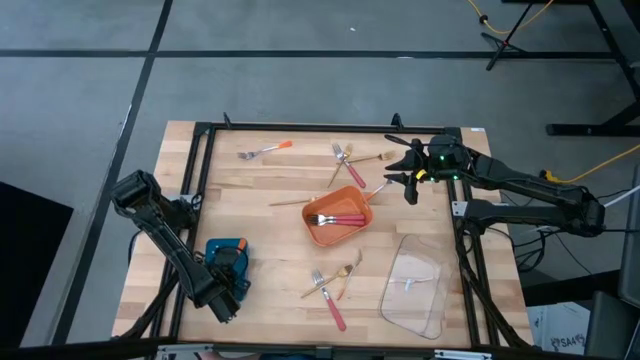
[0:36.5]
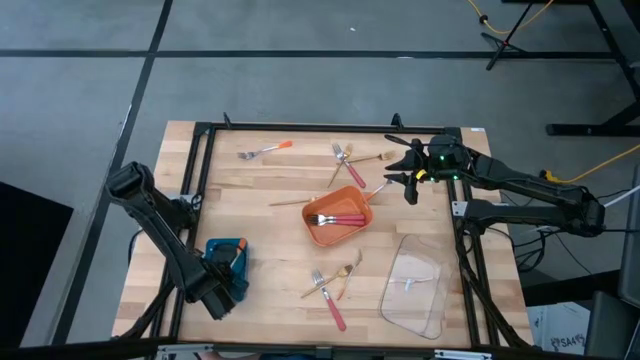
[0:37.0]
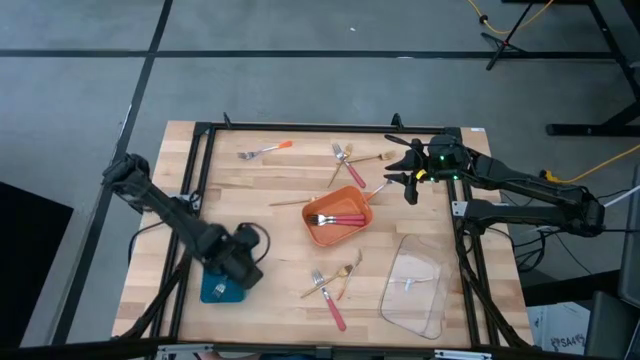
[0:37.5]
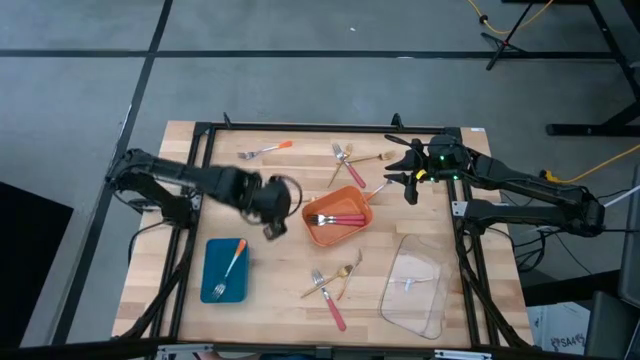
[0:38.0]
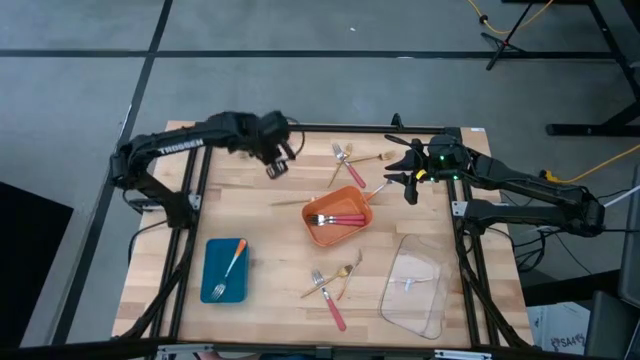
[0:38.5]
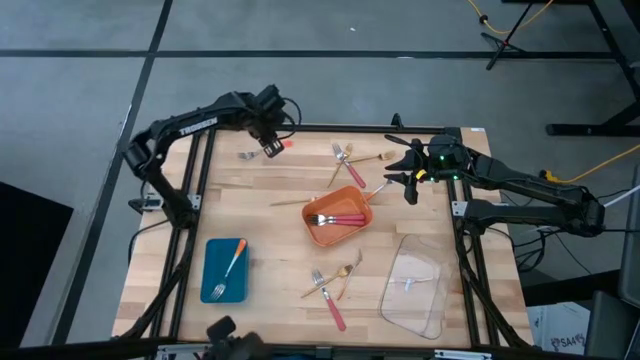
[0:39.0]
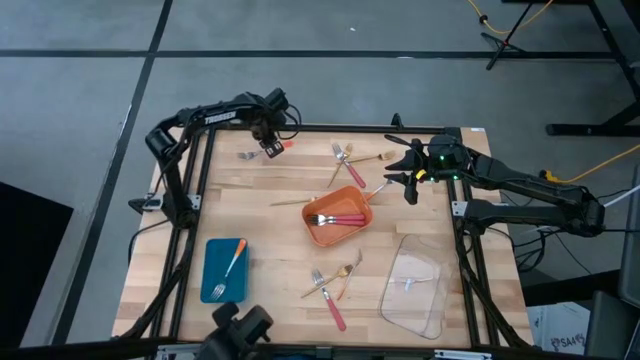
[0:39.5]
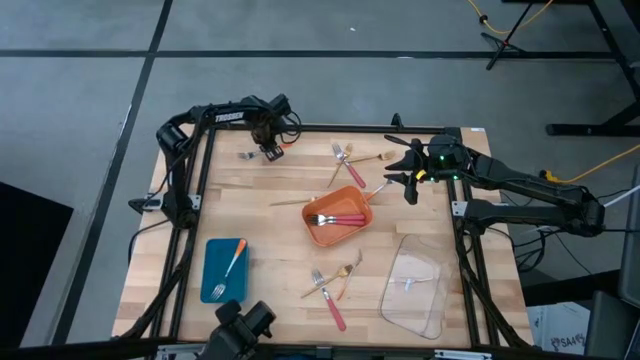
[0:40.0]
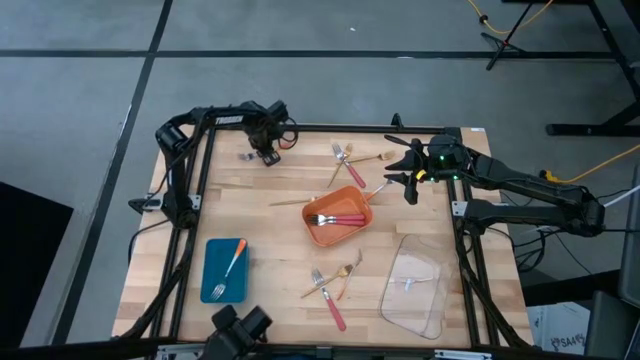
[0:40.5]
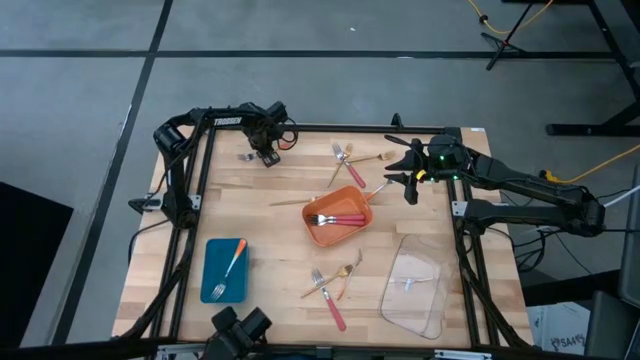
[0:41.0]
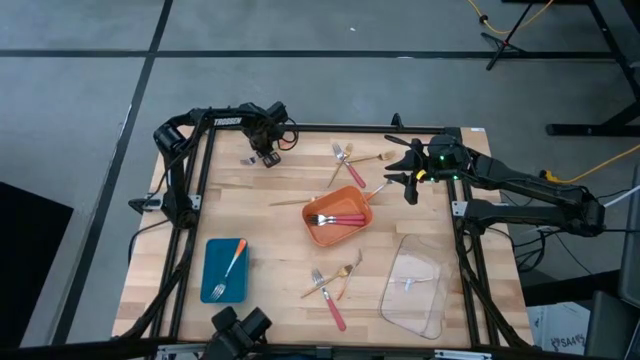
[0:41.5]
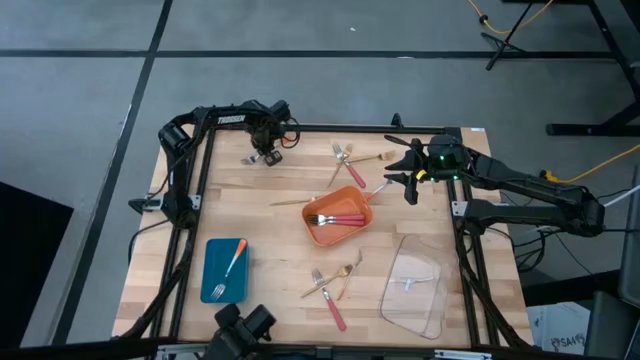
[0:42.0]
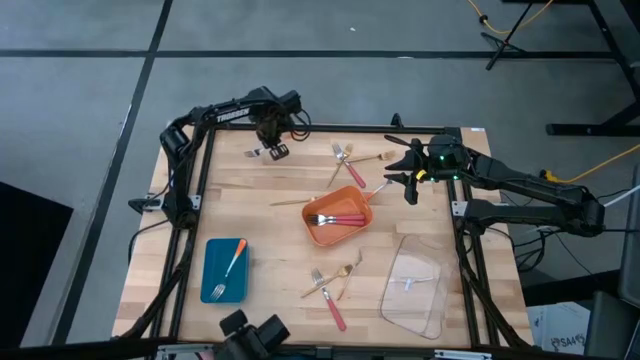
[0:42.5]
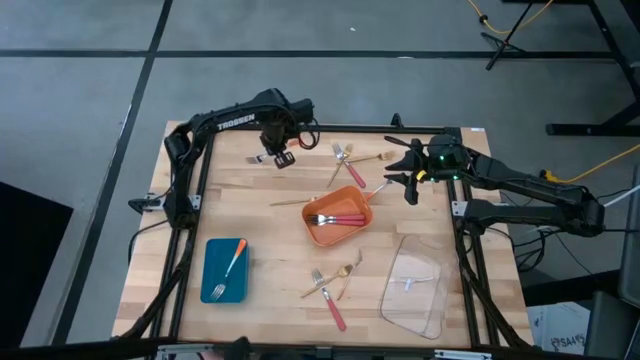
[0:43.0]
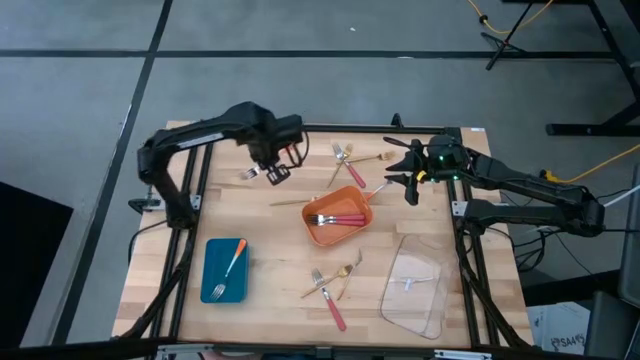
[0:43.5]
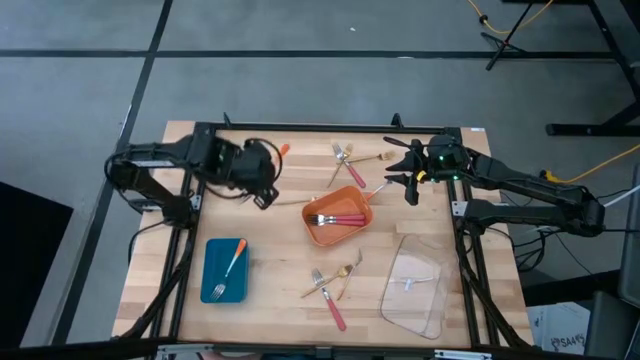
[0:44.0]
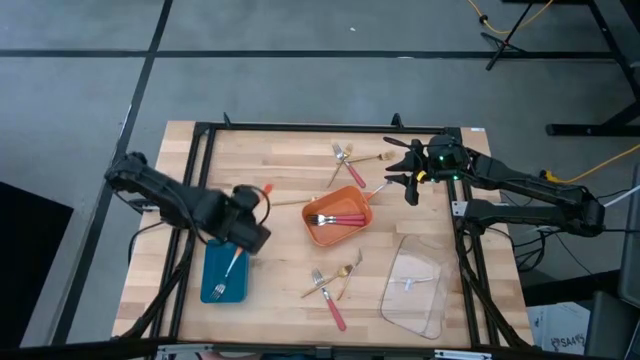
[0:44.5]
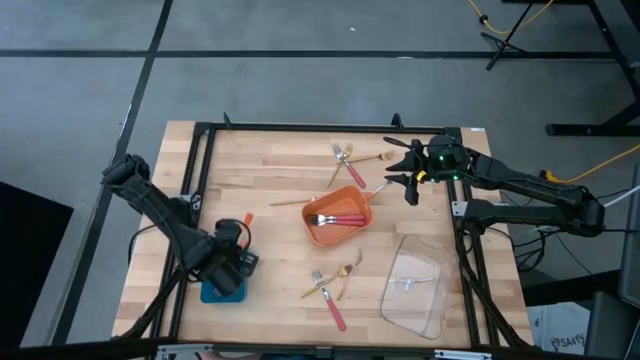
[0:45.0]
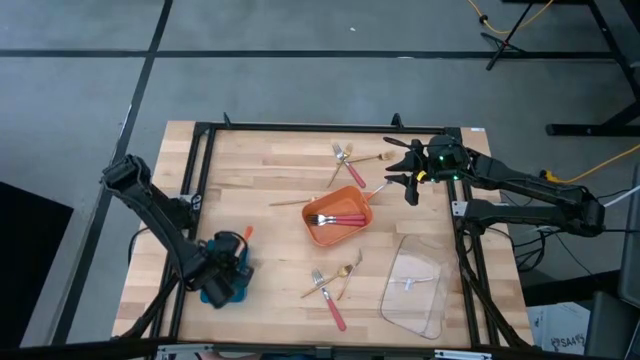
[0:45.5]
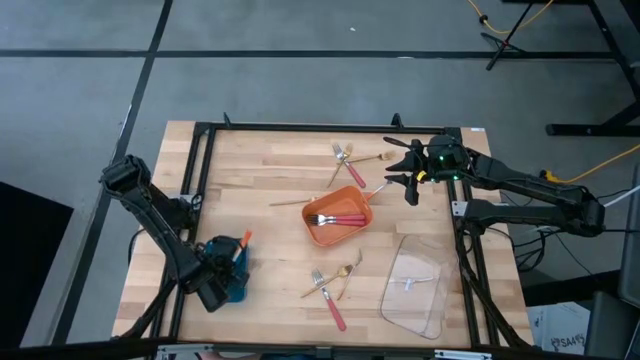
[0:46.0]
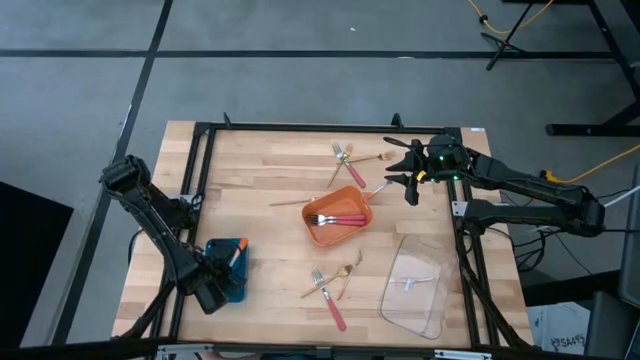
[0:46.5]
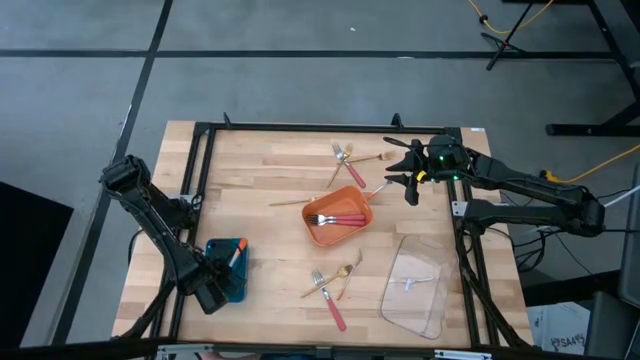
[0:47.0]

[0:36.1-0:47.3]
Task: Sort silverware by color (type)
Put the orange fork into the blue bin

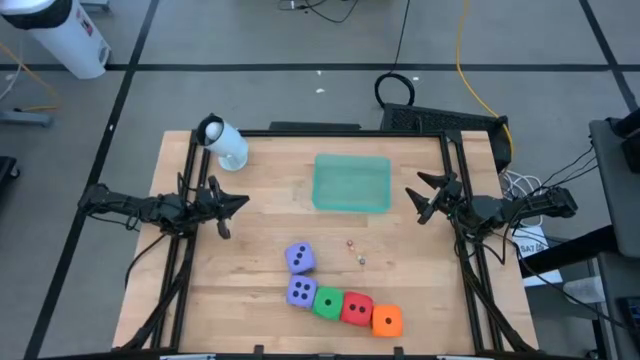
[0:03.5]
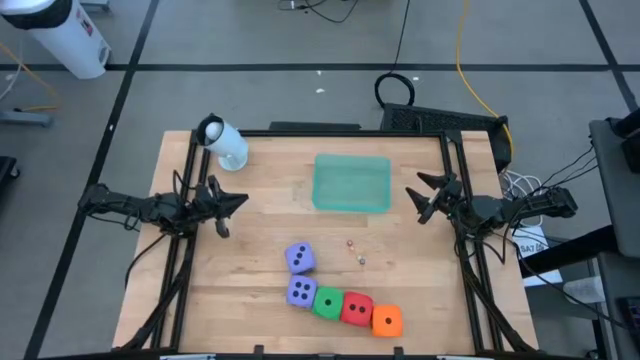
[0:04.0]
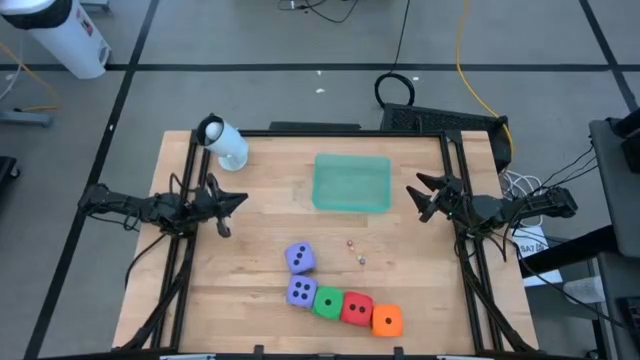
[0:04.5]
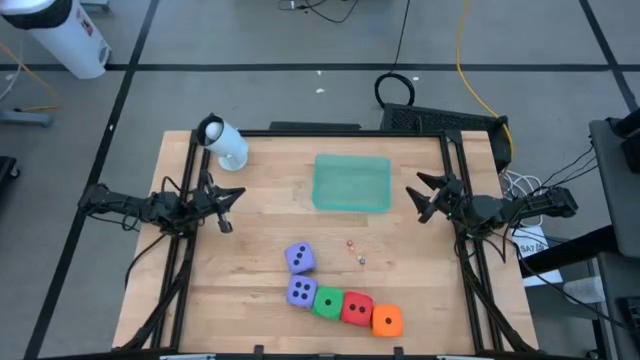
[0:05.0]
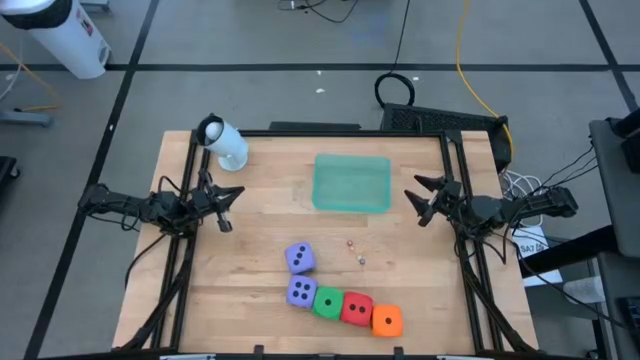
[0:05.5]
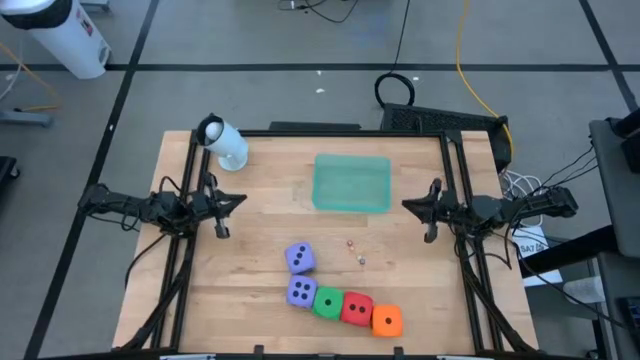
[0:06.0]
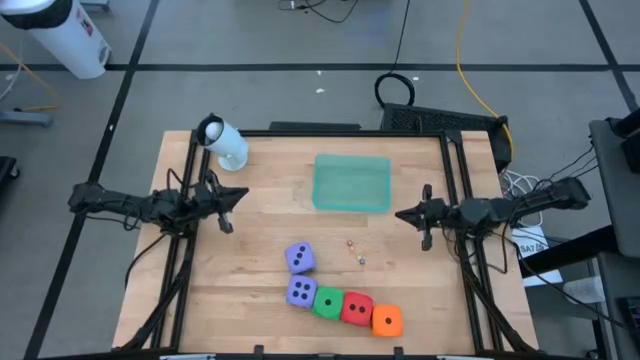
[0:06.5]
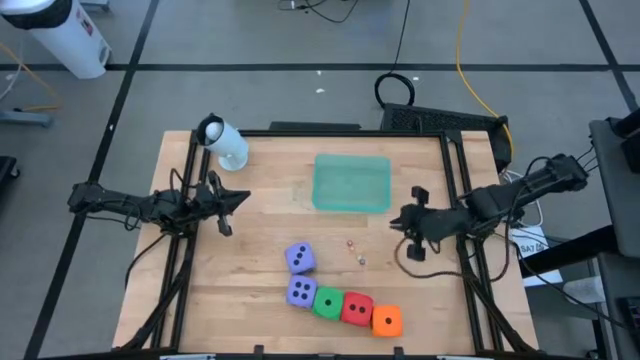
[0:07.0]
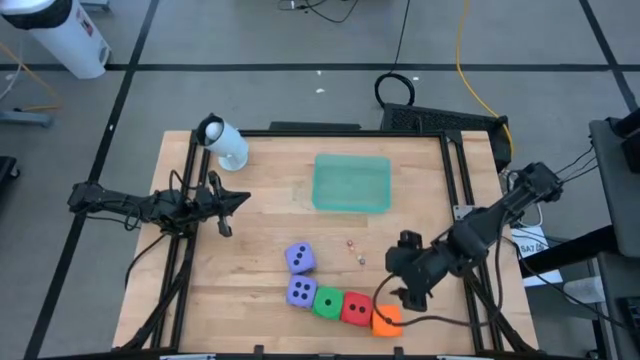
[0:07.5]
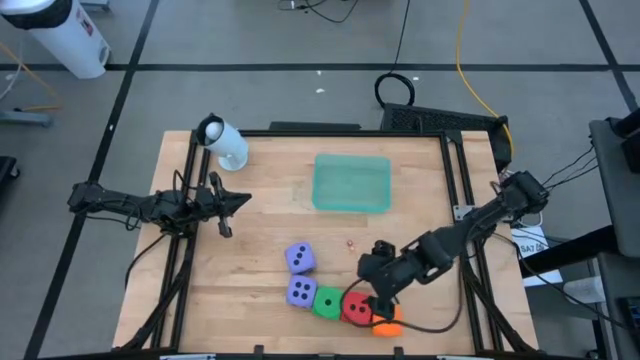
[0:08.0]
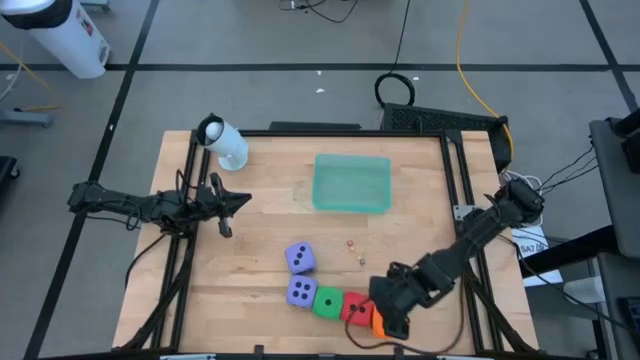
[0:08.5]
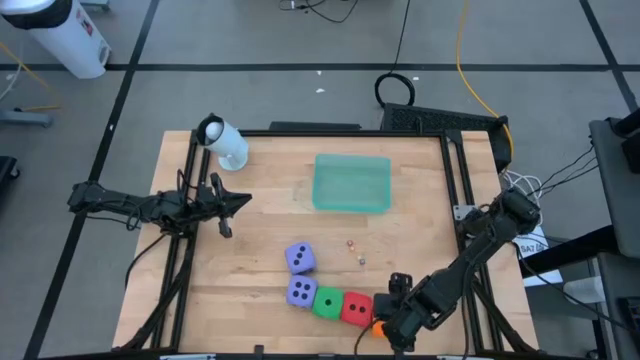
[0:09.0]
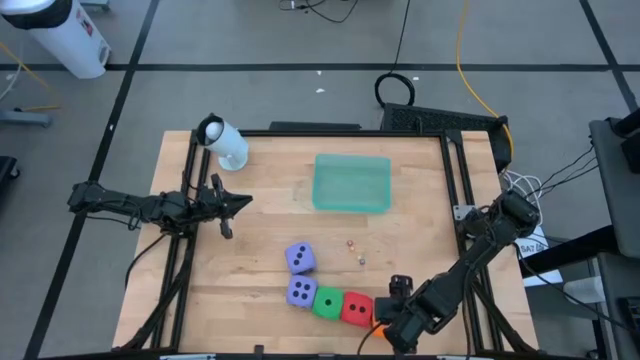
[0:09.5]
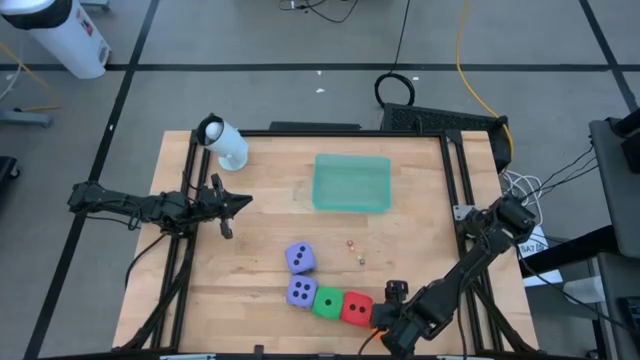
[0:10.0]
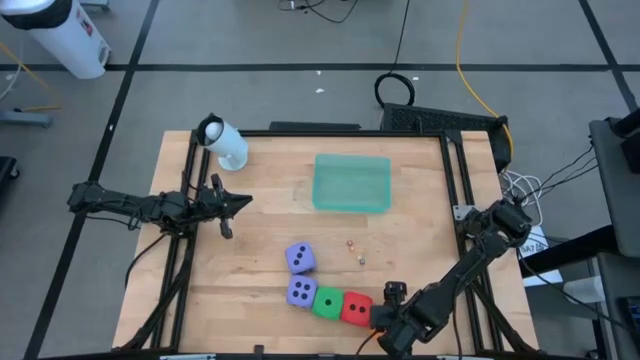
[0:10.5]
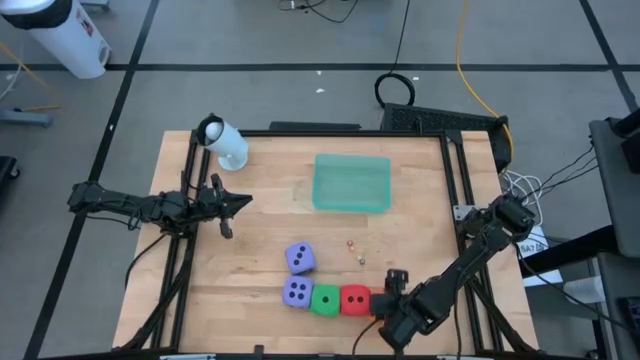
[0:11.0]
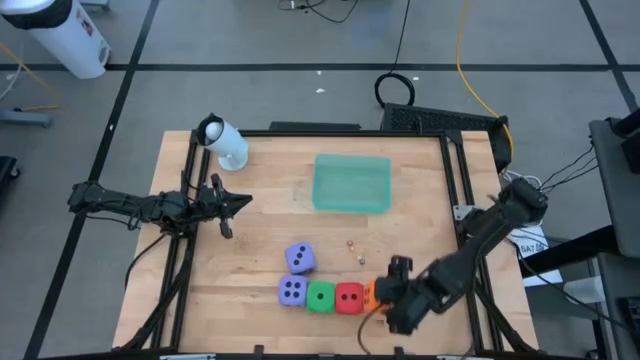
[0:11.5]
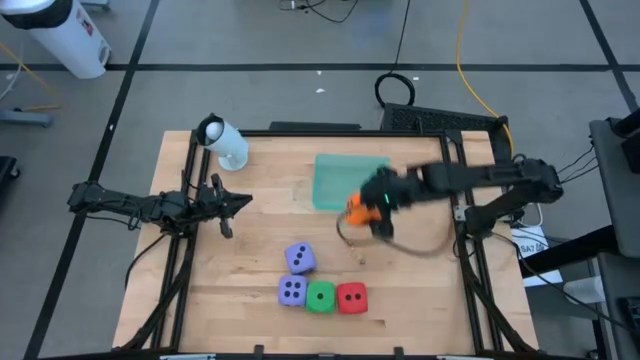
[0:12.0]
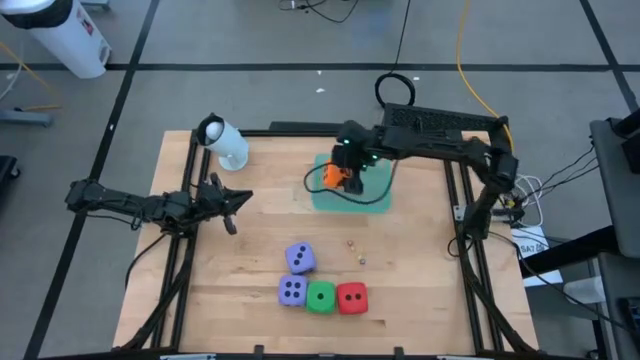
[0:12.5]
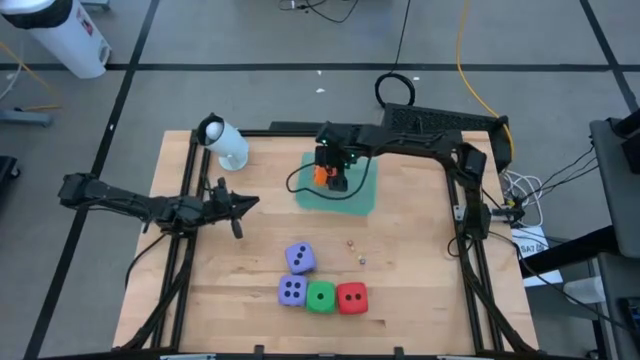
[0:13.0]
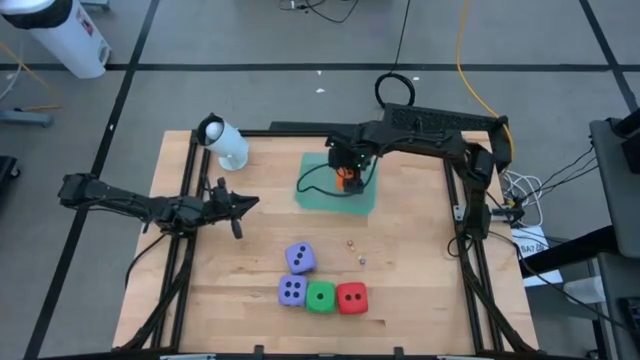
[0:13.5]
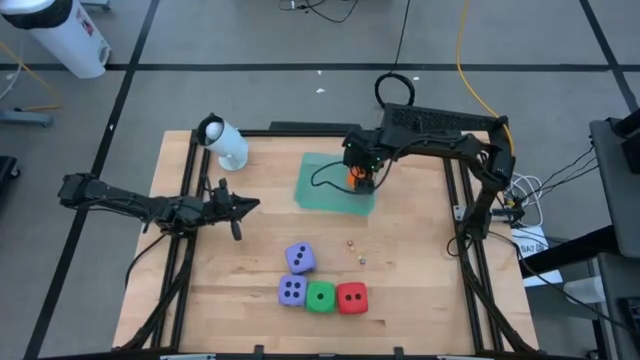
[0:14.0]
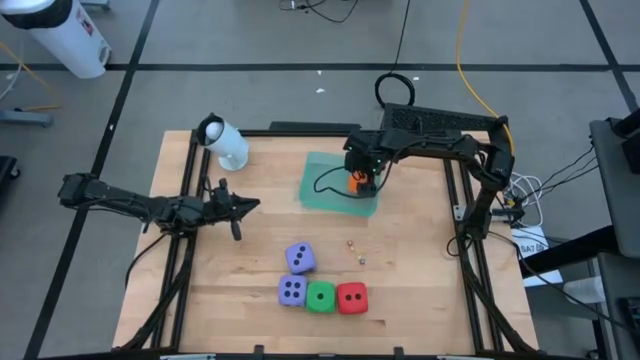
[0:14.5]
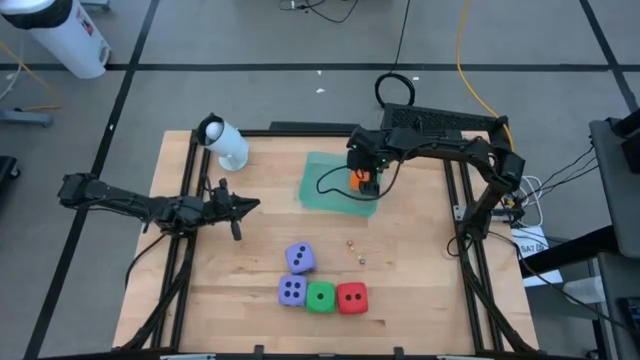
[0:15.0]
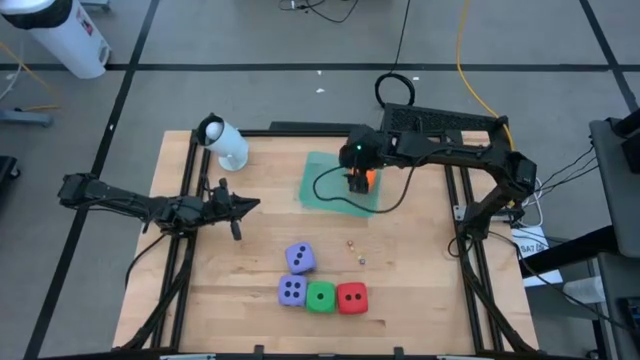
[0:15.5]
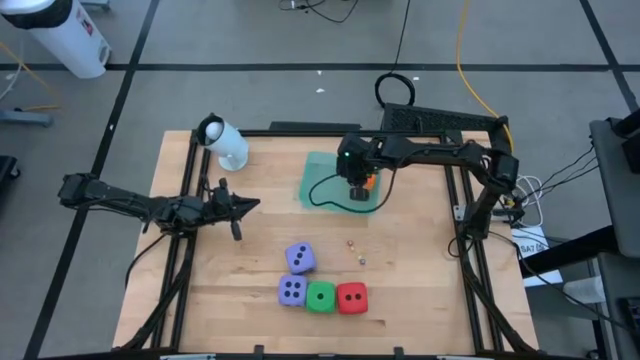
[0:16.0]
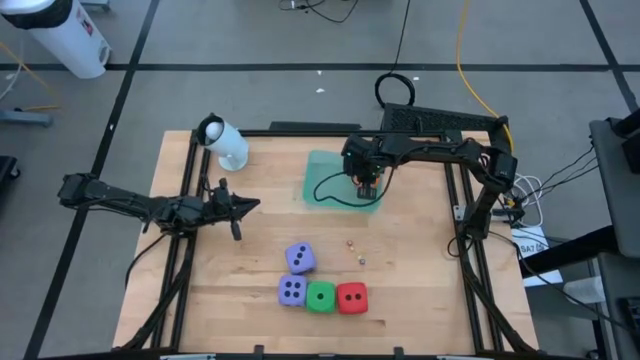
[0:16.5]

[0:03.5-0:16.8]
Task: Pick & Place Dice
Put the large orange die into the green bin
